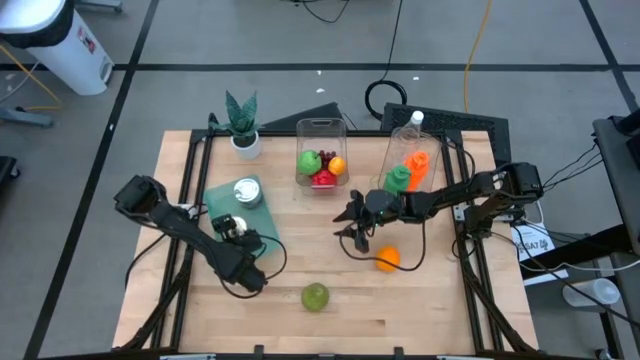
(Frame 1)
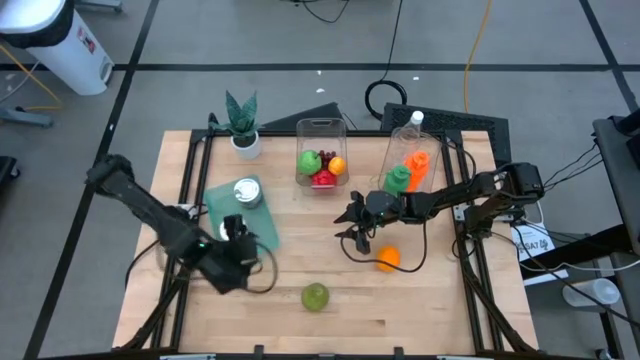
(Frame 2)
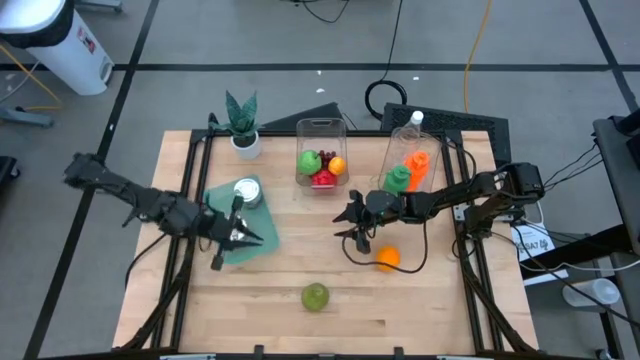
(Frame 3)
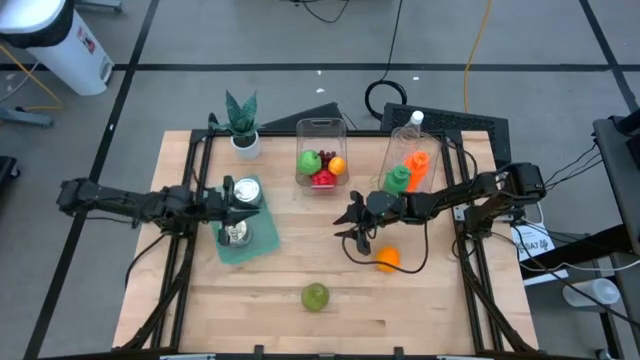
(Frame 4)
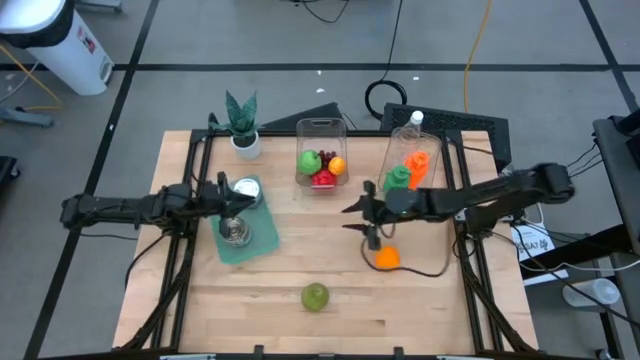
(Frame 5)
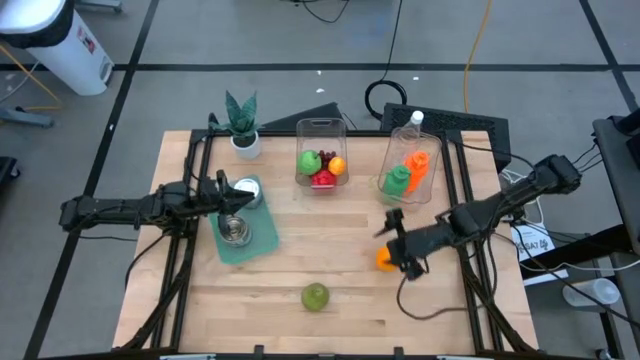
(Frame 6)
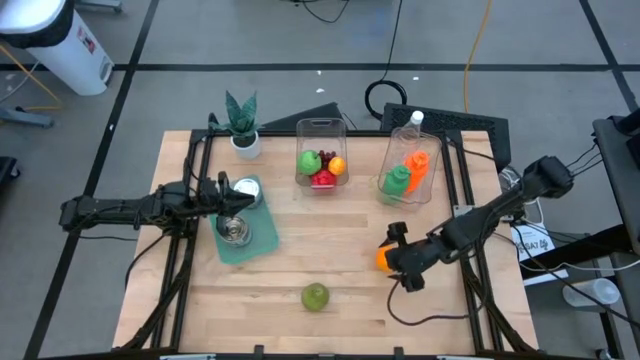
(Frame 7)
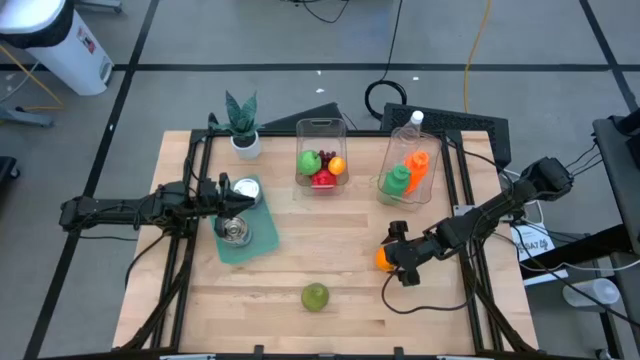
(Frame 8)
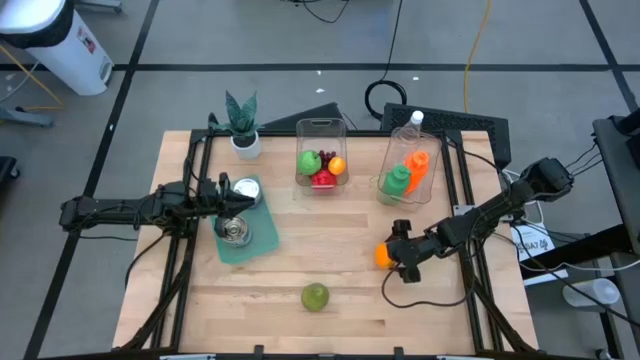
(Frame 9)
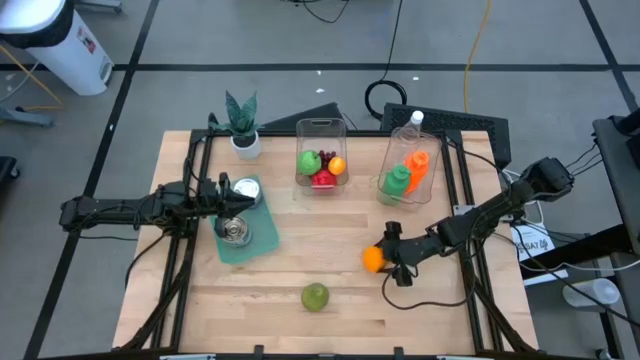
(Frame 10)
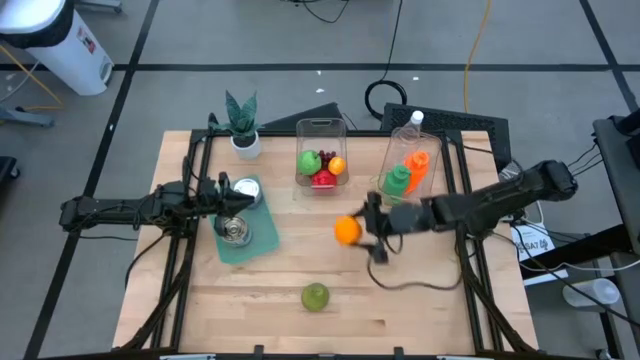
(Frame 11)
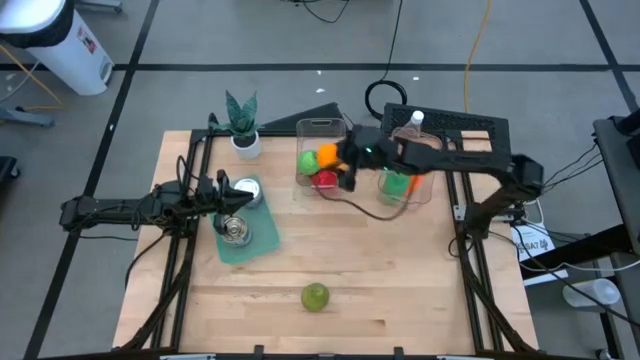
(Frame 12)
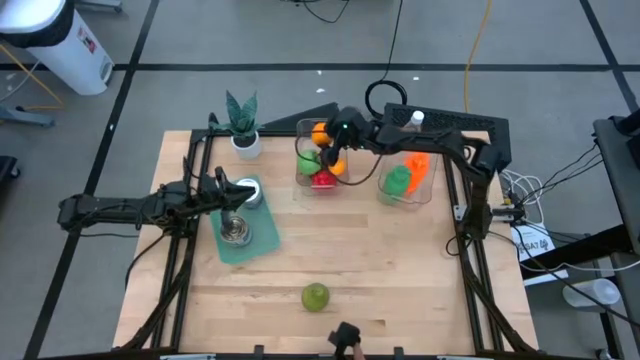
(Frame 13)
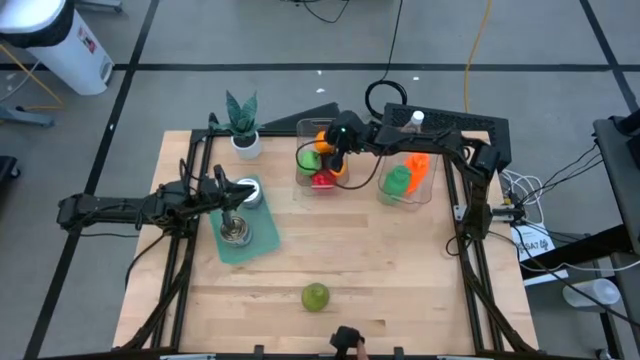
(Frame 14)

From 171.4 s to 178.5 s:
Task: Pick & Place Food Item
Put the orange into the left transparent bin

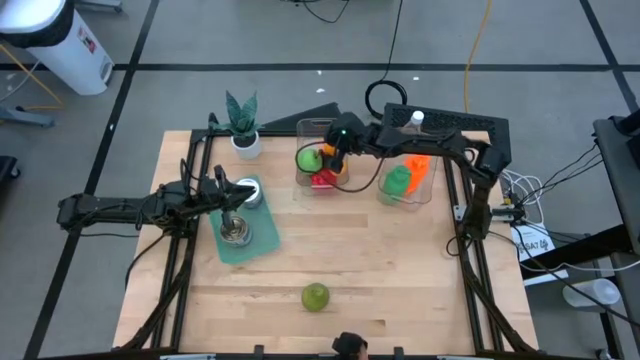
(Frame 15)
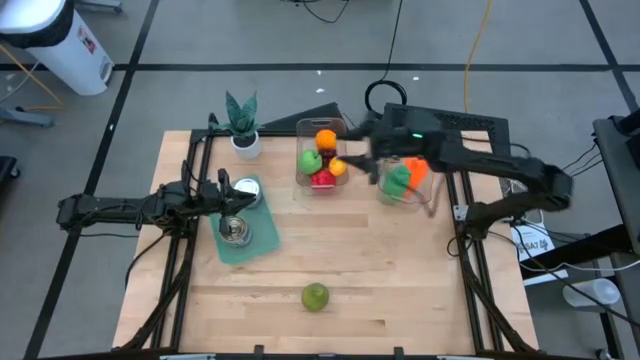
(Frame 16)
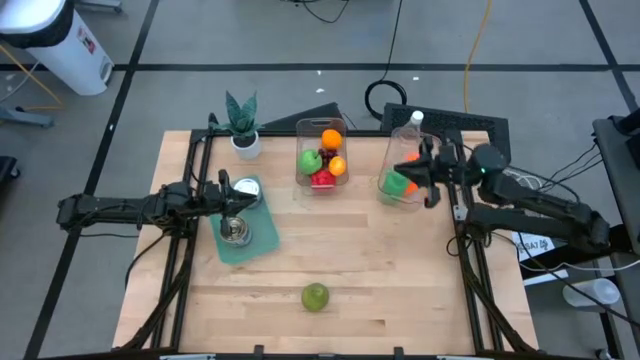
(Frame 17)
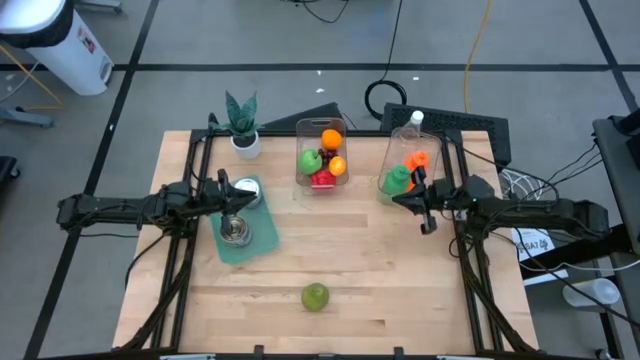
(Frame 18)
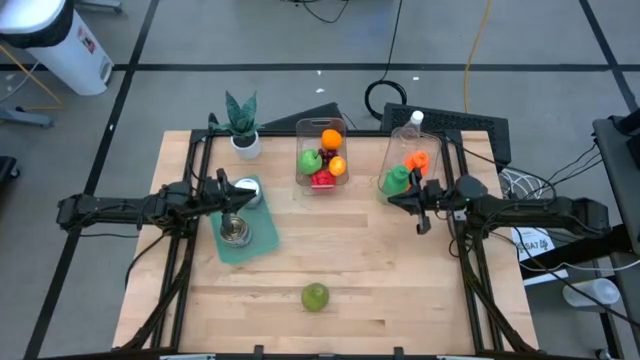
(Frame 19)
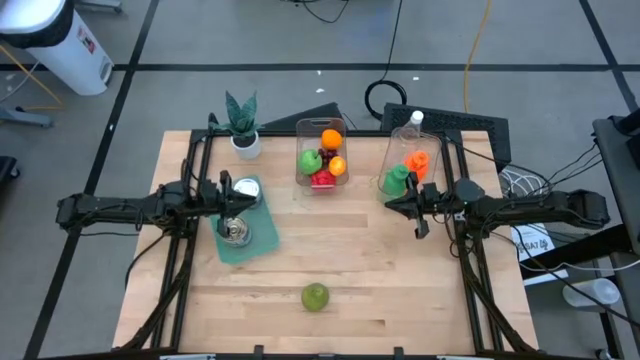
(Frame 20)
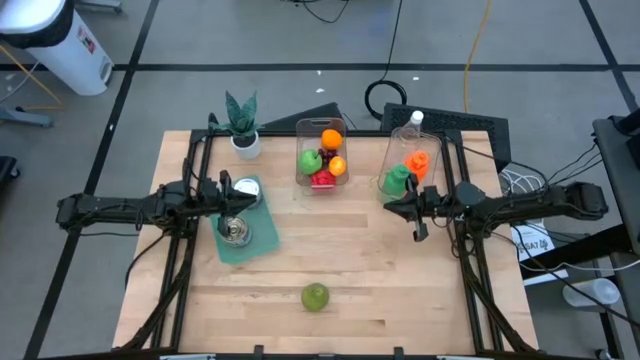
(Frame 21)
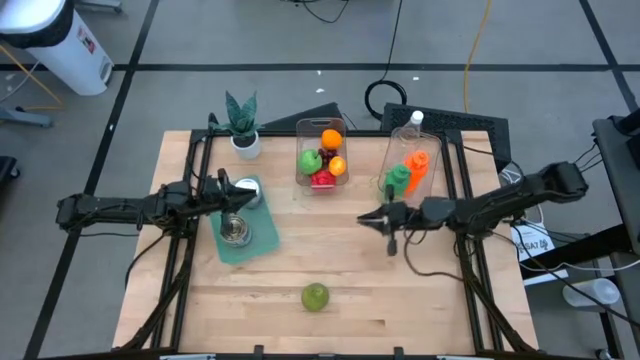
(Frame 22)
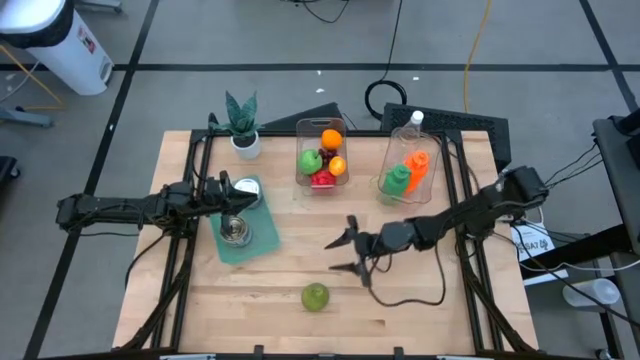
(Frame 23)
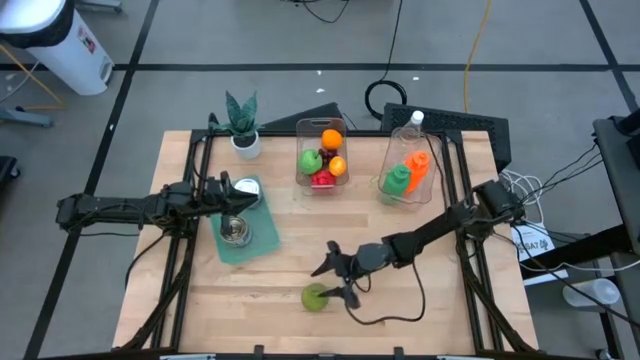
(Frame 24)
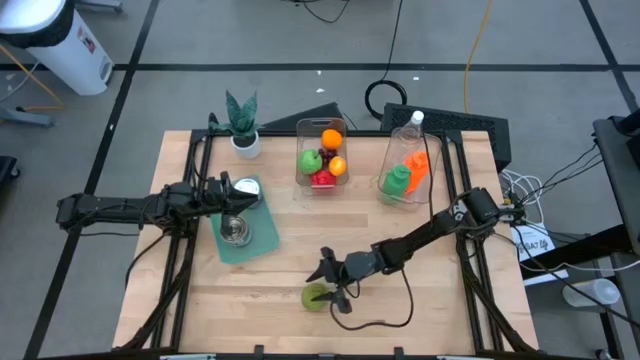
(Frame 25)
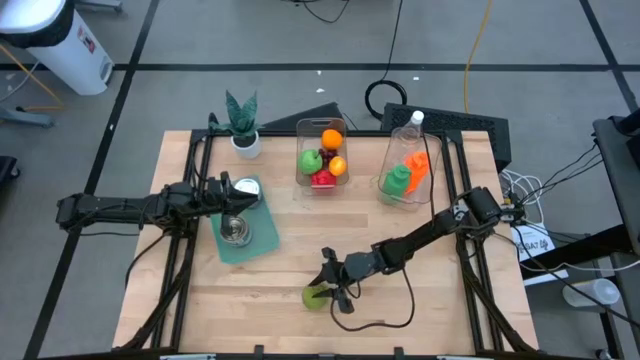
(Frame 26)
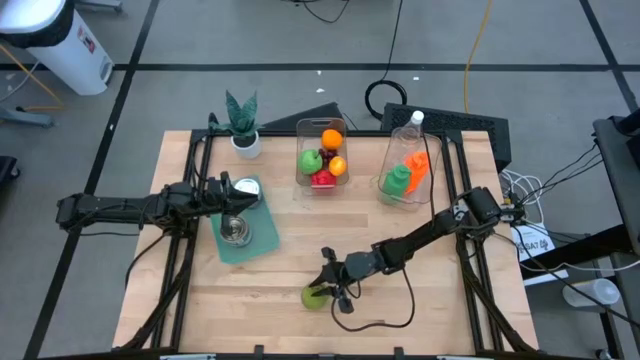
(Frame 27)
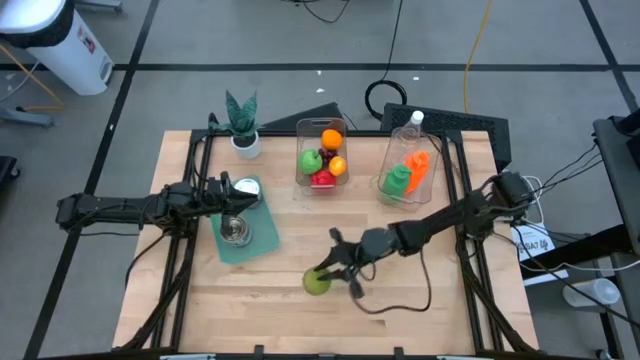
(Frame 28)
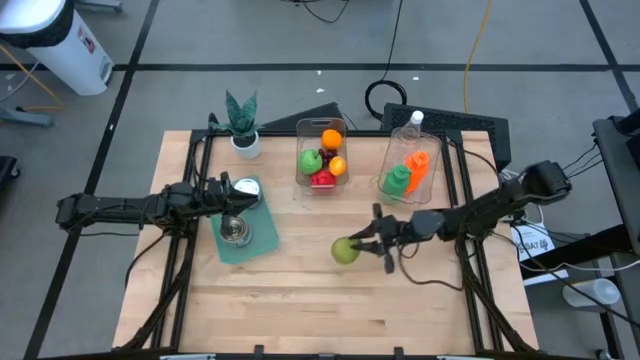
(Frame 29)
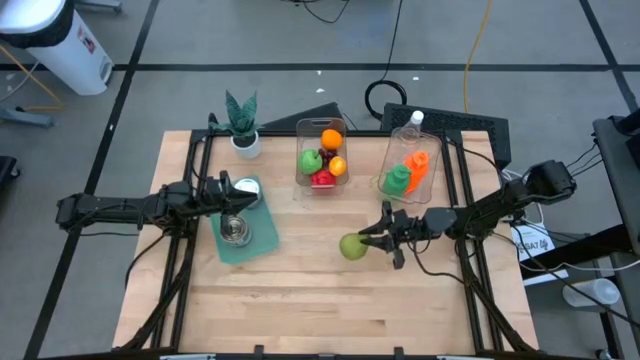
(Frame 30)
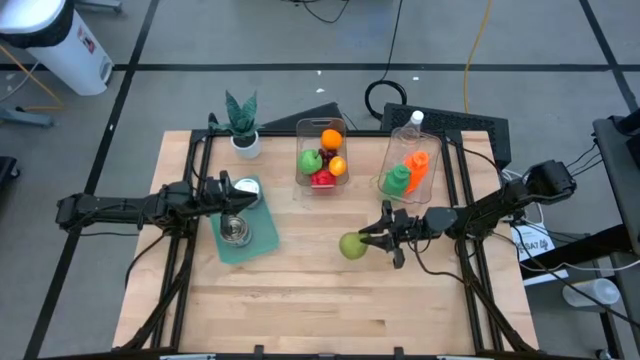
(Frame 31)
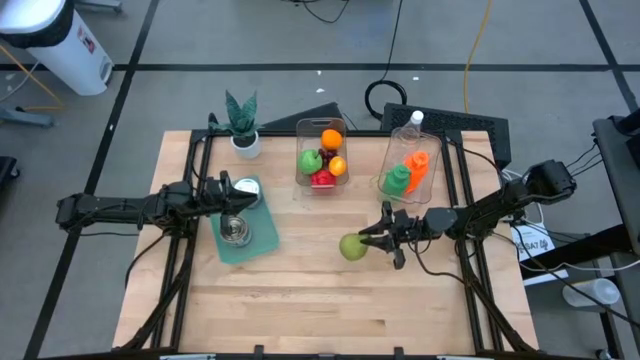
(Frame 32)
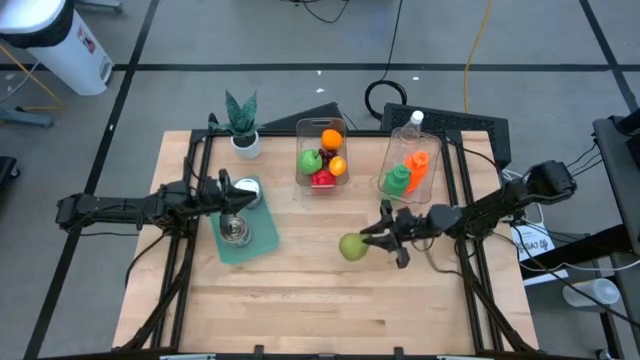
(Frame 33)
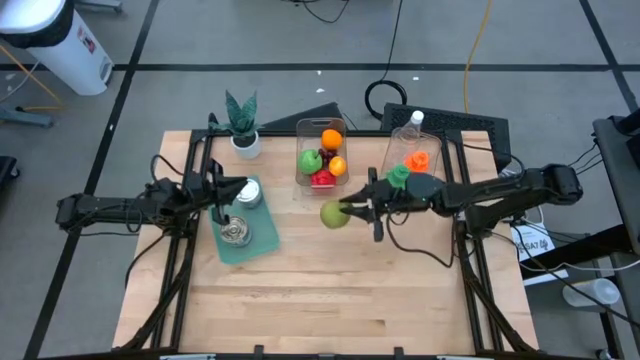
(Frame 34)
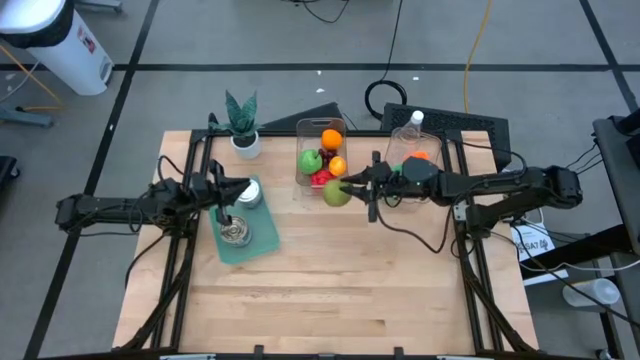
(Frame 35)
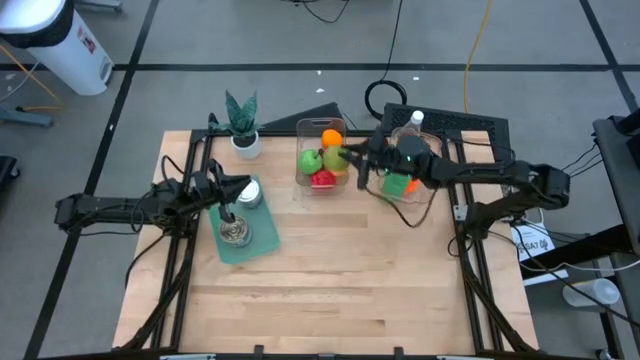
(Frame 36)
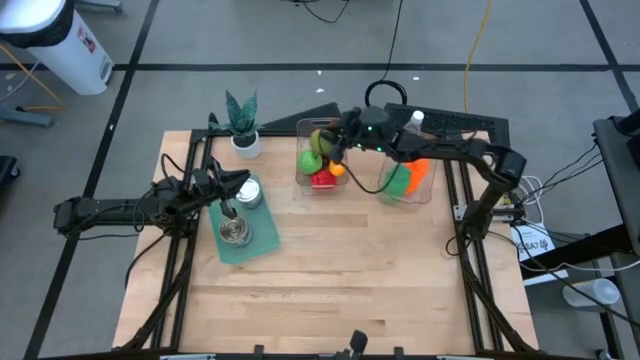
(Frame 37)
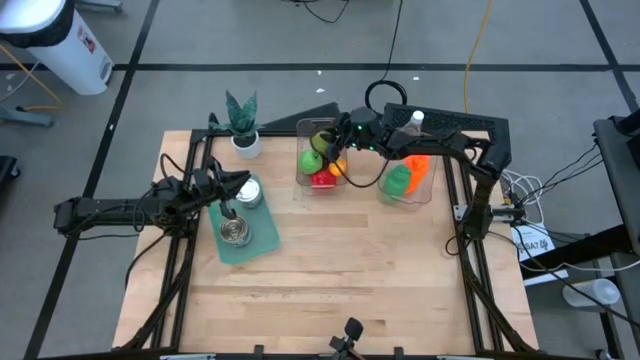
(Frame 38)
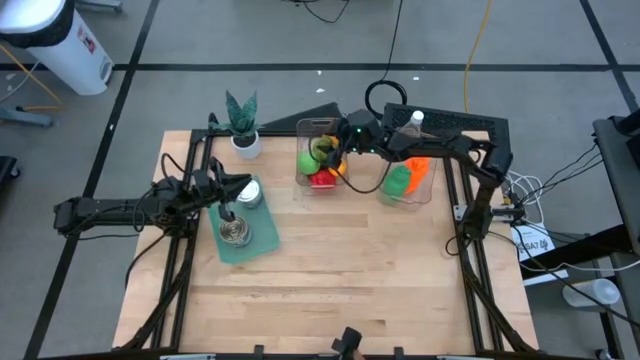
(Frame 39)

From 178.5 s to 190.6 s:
Put the pear into the left transparent bin
